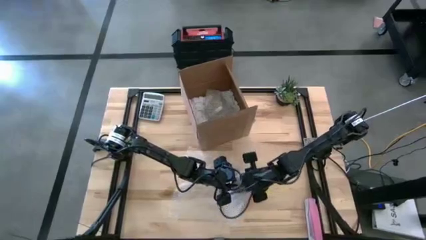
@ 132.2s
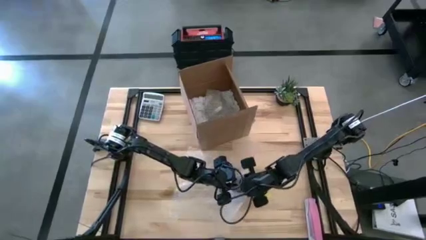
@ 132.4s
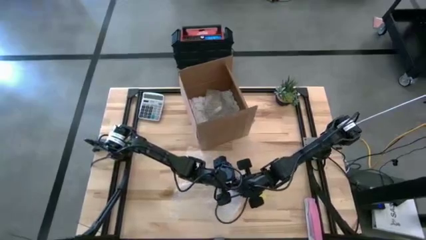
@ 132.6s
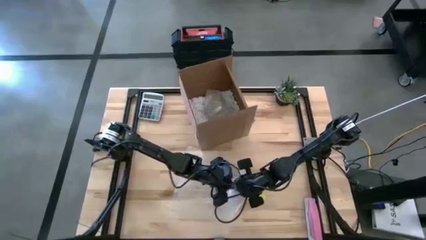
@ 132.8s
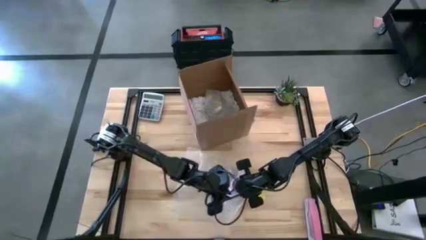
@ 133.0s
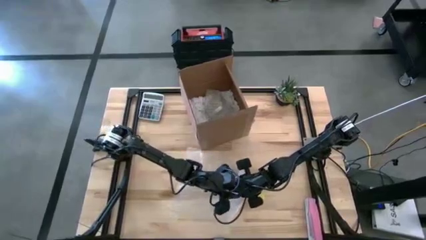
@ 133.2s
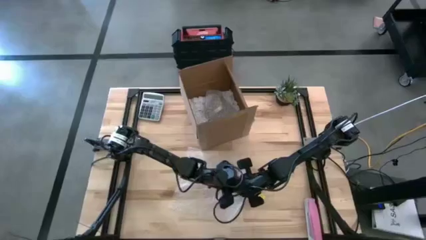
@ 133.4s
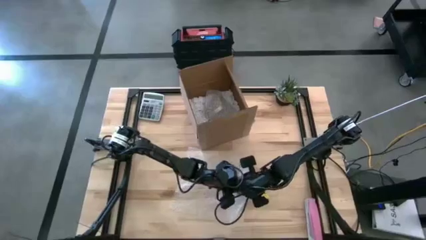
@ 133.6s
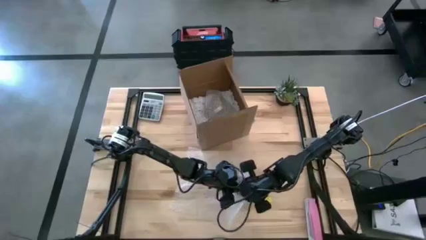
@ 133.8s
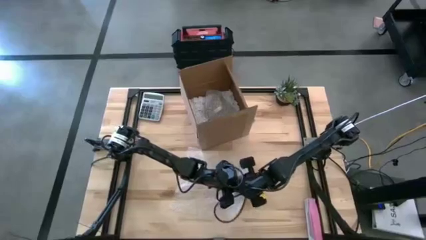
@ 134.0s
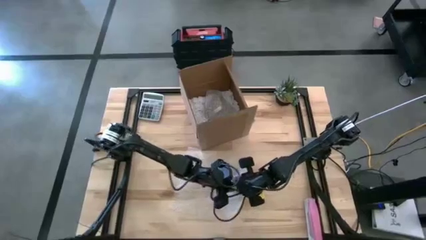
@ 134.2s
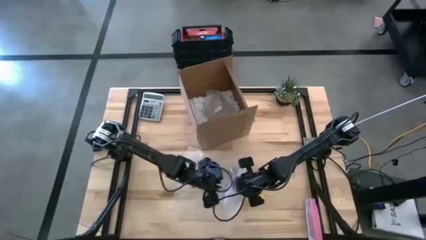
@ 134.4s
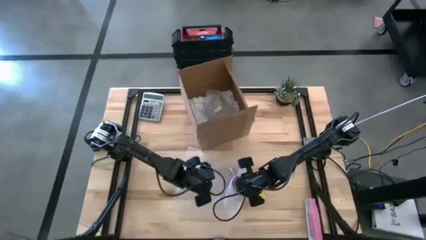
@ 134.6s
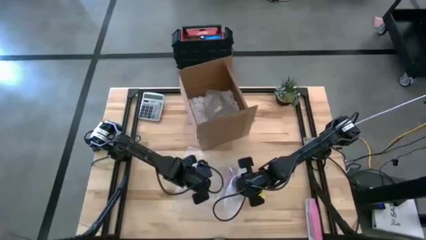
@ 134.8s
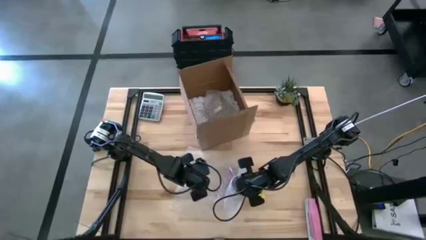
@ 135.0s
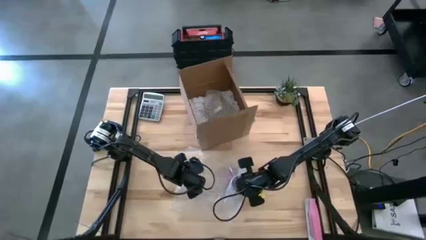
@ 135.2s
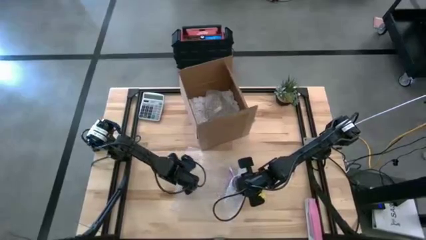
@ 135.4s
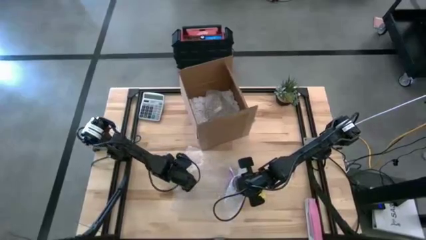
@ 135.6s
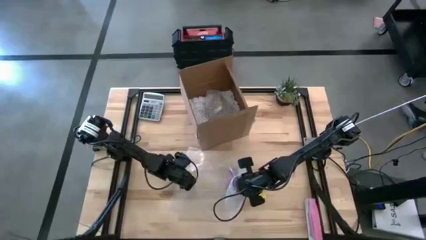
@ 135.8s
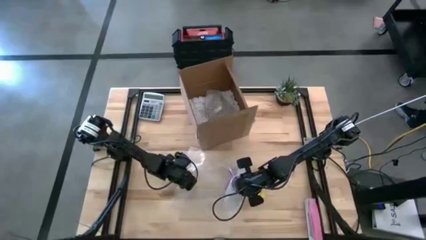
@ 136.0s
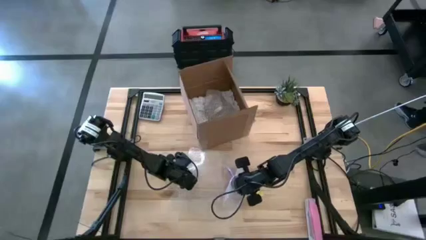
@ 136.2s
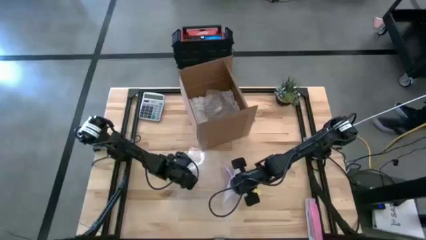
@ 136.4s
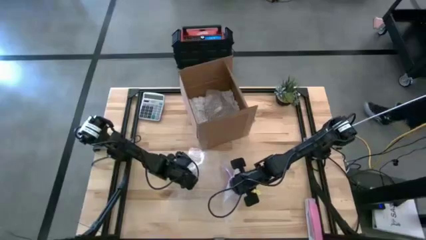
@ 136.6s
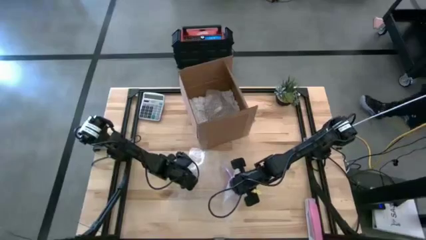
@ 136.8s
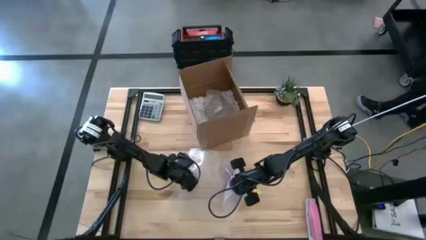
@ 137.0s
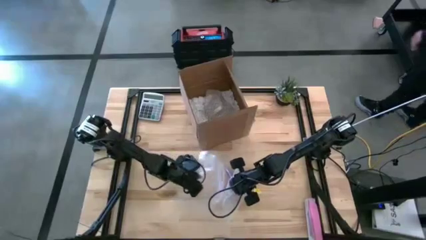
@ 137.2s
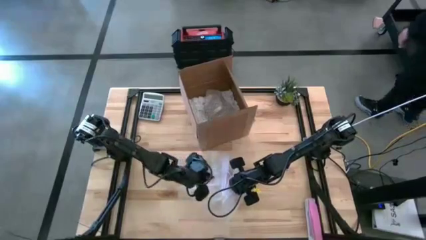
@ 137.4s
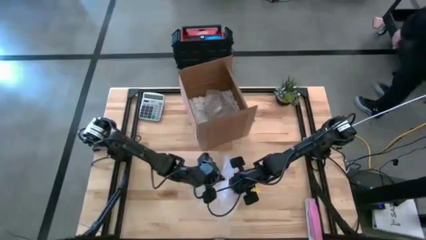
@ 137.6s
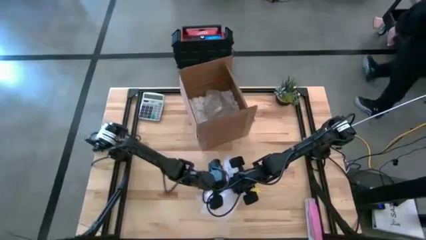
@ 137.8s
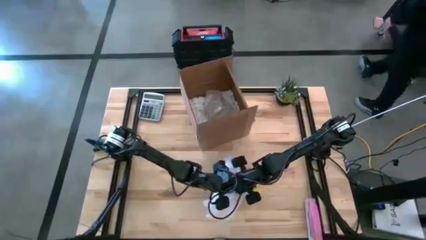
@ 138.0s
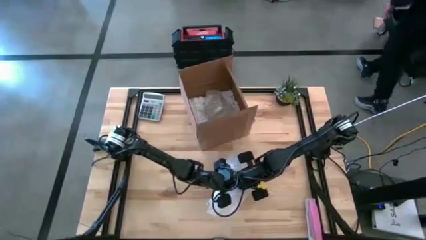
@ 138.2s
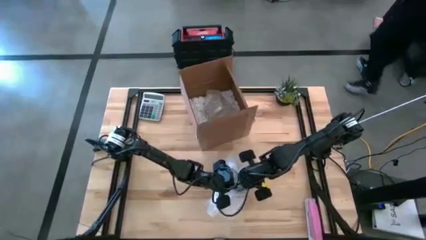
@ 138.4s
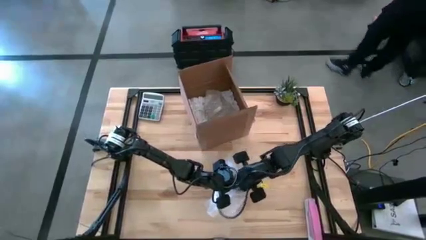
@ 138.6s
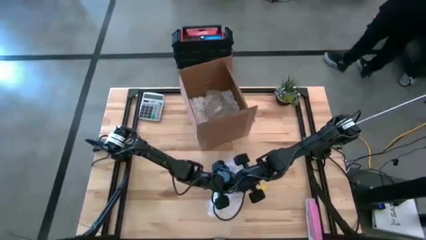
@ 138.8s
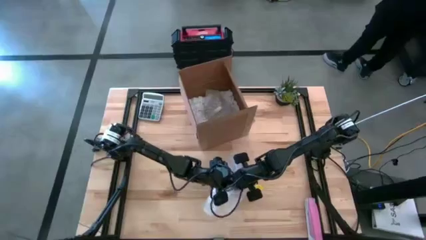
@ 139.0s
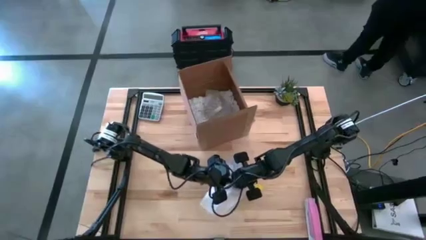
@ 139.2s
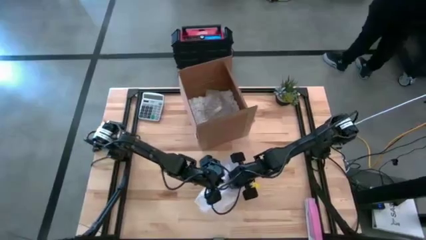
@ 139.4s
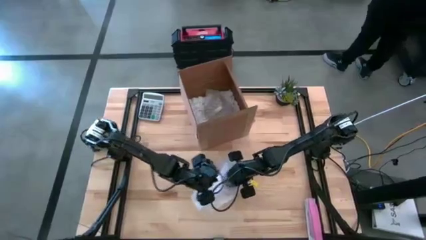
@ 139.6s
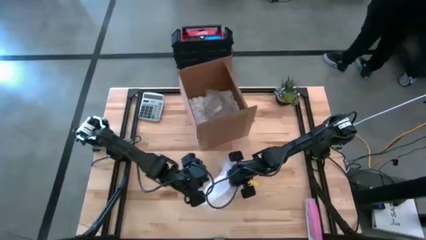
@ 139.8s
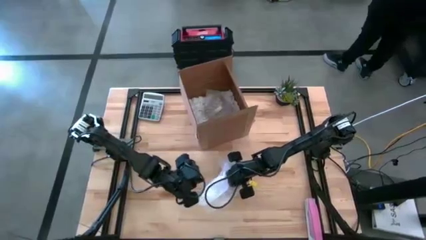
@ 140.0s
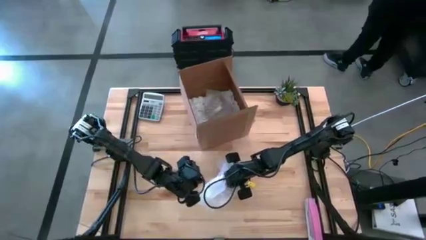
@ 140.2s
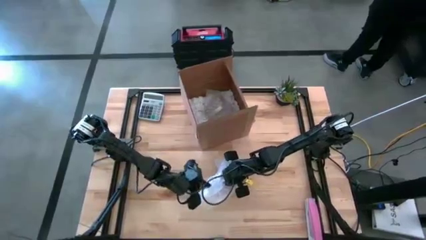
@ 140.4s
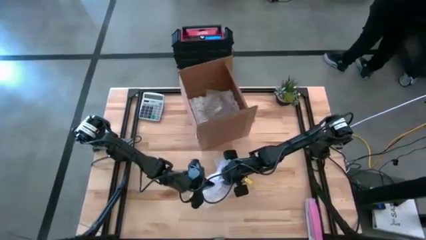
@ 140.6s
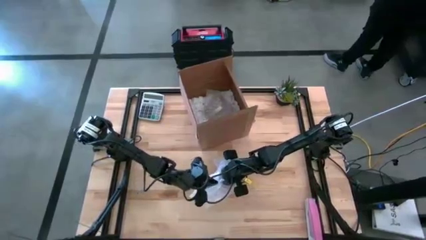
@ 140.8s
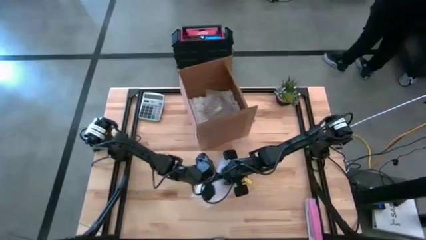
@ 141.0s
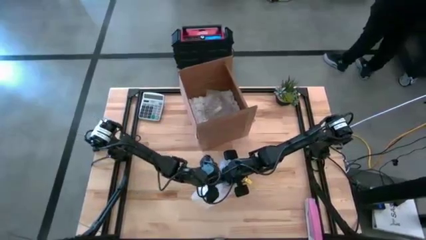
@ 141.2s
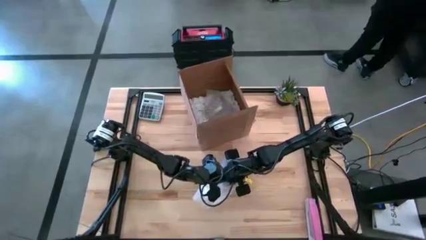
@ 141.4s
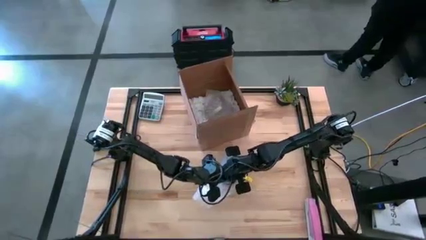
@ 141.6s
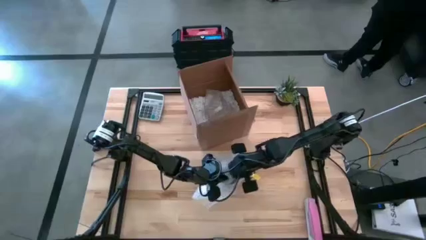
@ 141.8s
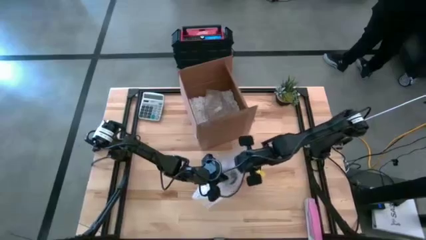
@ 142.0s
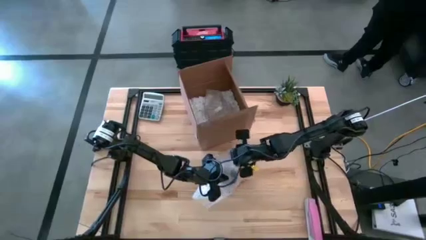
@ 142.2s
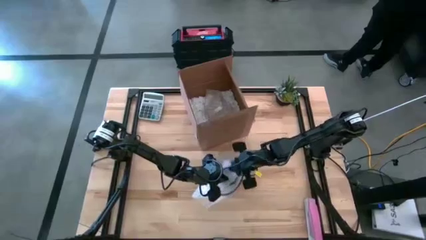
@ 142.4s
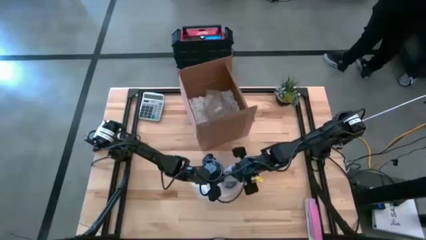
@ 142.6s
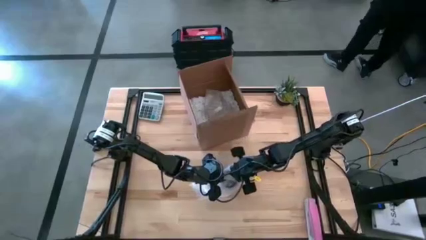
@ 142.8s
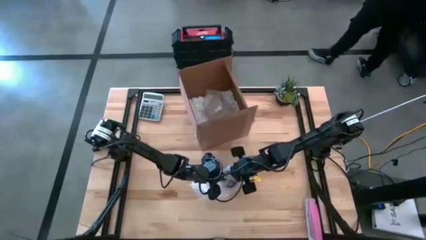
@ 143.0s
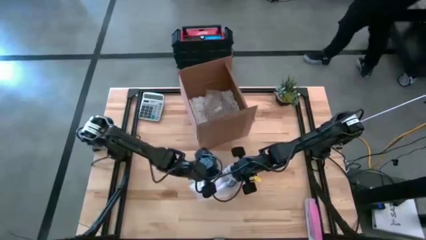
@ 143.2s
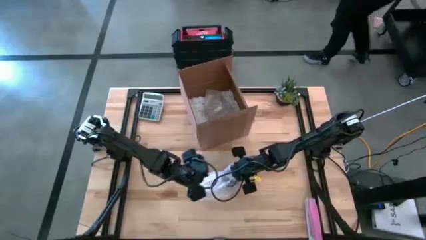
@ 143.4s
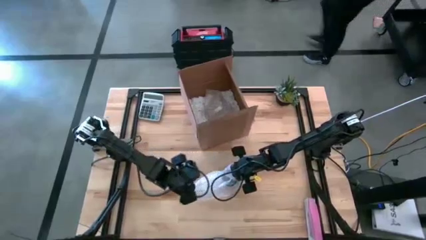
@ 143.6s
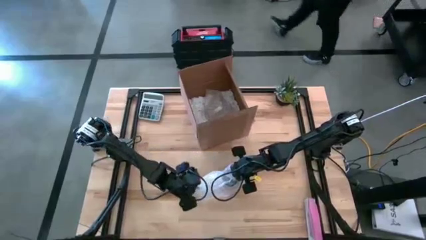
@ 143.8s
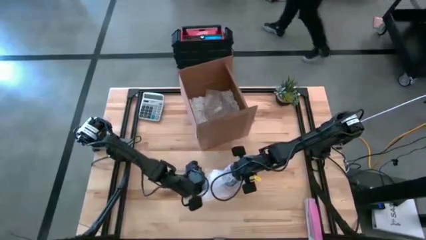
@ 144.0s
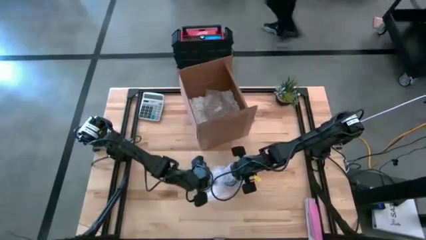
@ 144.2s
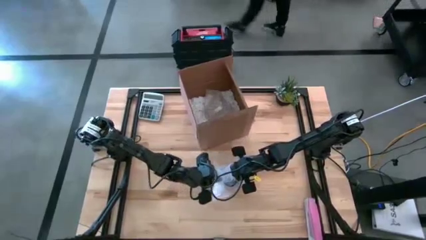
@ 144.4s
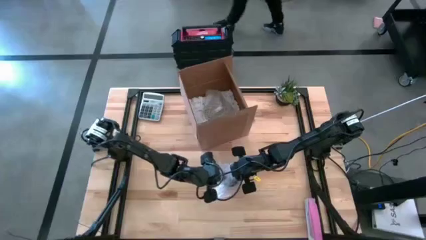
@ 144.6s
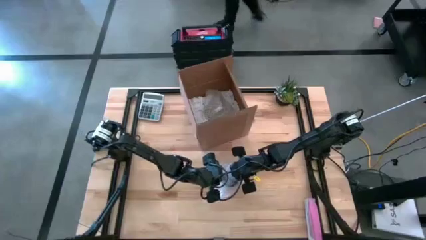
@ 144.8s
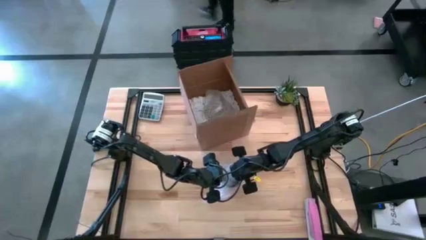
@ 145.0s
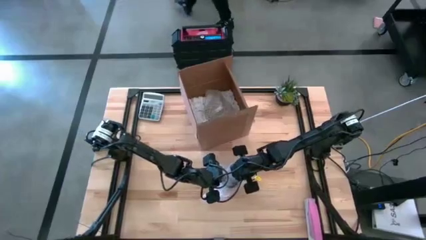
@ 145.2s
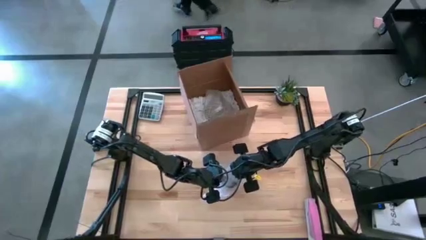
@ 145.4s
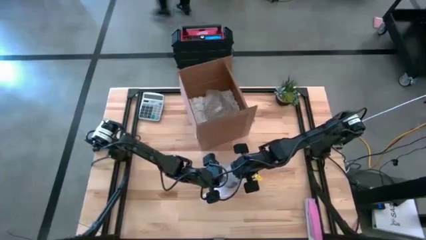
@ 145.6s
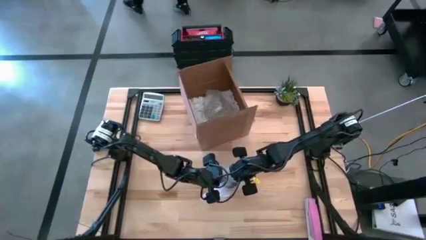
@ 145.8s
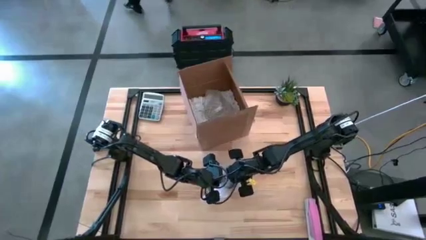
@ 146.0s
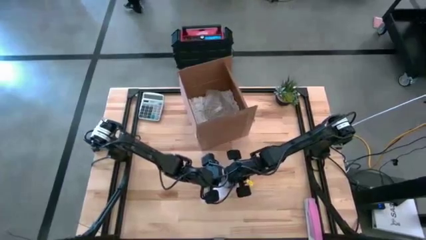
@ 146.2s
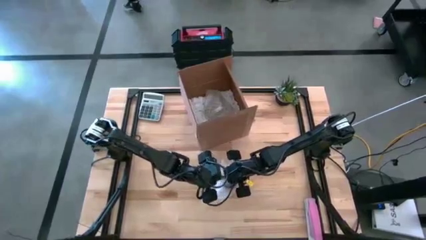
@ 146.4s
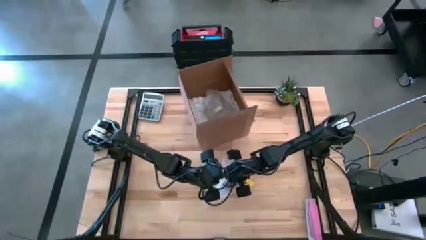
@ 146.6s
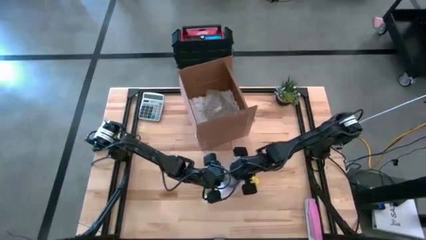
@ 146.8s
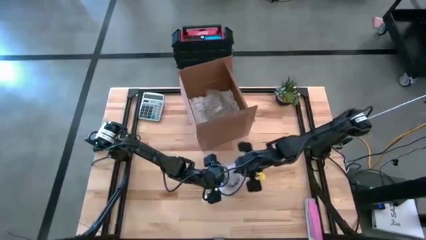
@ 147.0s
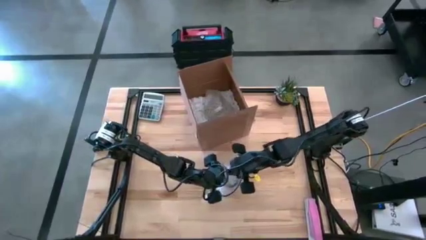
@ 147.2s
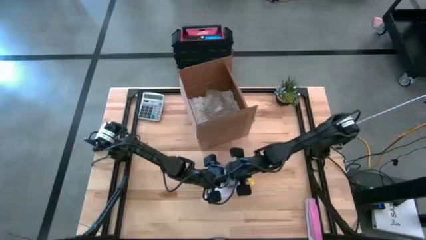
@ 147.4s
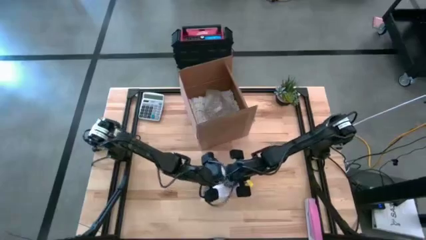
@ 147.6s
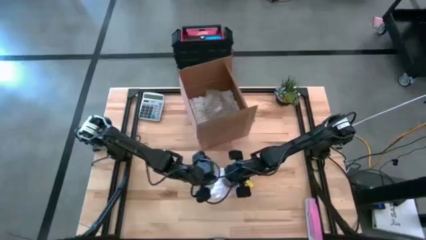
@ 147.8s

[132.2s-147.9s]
Task: wrap mug
Wrap the purple mug with the bubble wrap
